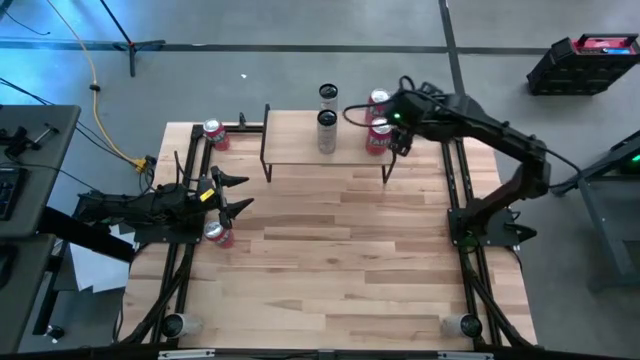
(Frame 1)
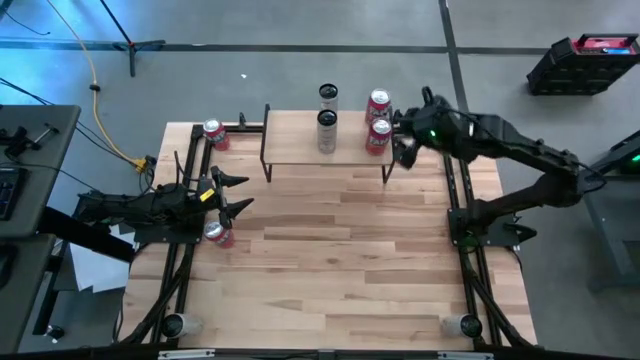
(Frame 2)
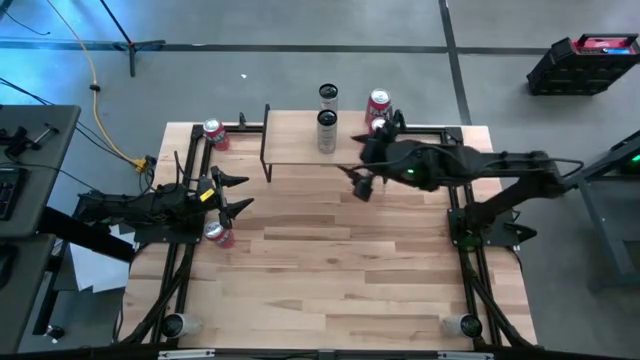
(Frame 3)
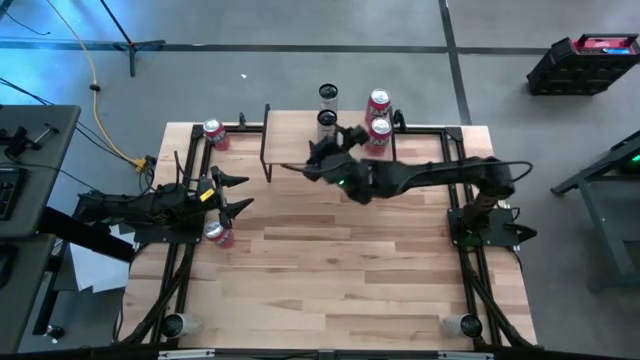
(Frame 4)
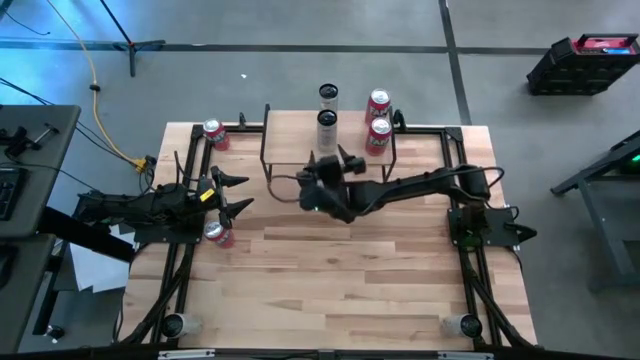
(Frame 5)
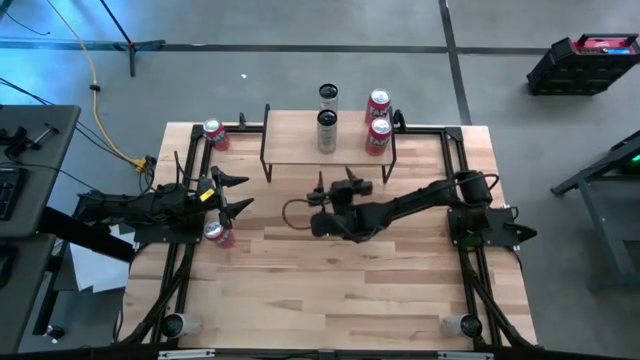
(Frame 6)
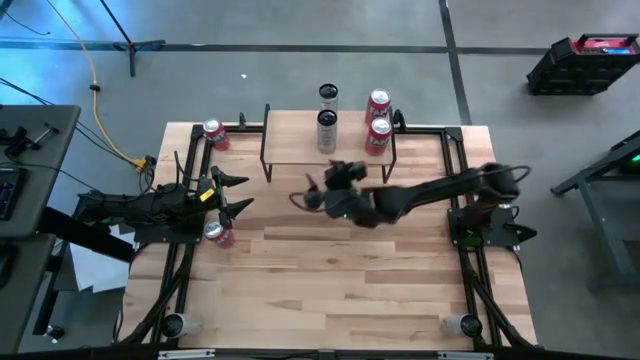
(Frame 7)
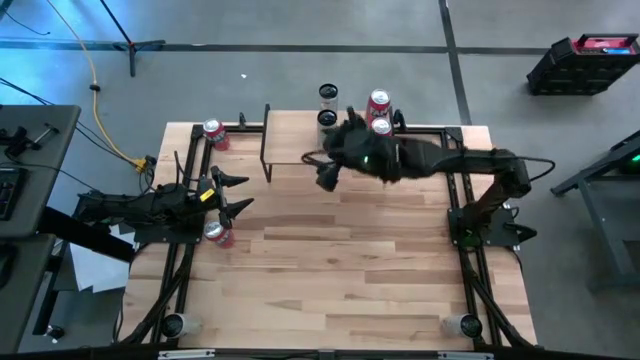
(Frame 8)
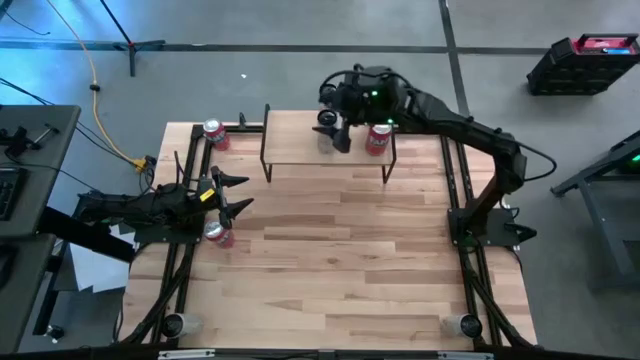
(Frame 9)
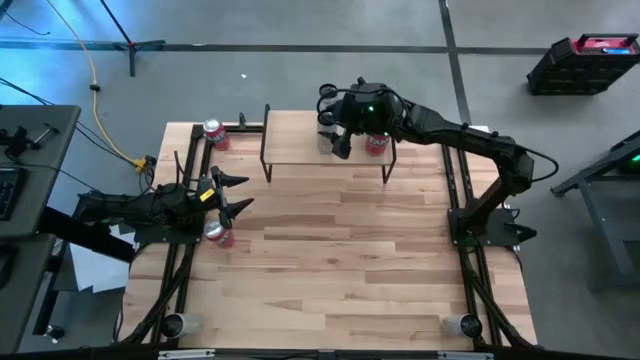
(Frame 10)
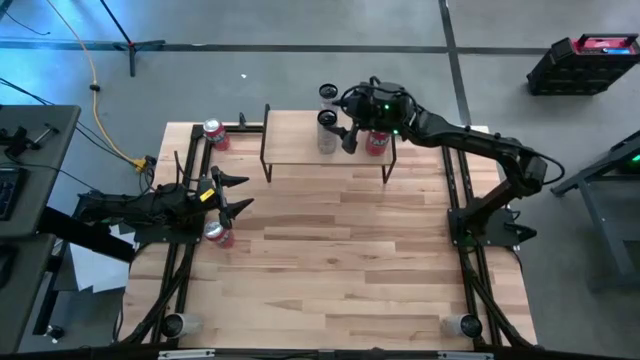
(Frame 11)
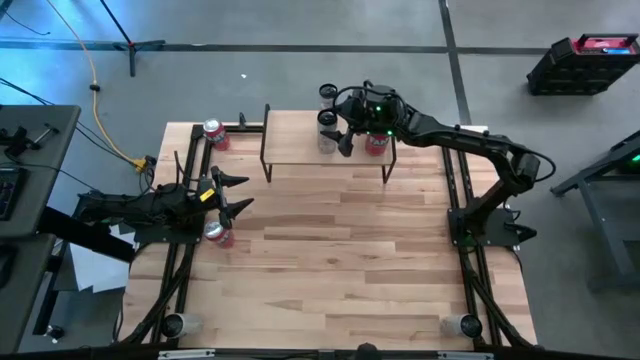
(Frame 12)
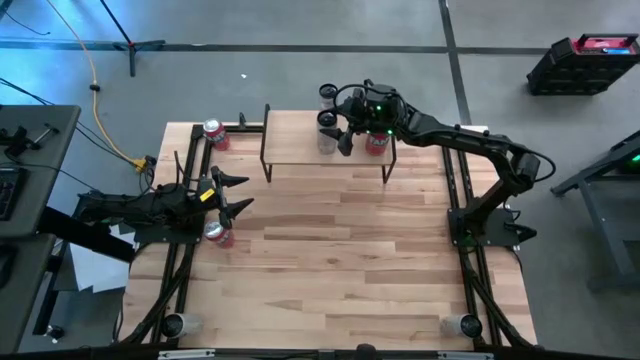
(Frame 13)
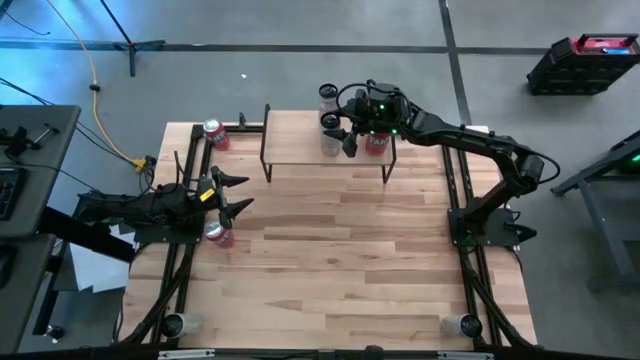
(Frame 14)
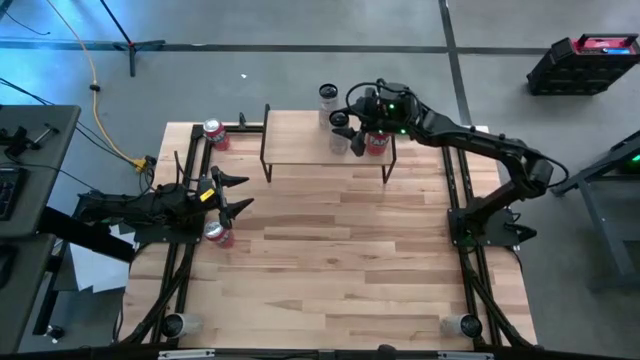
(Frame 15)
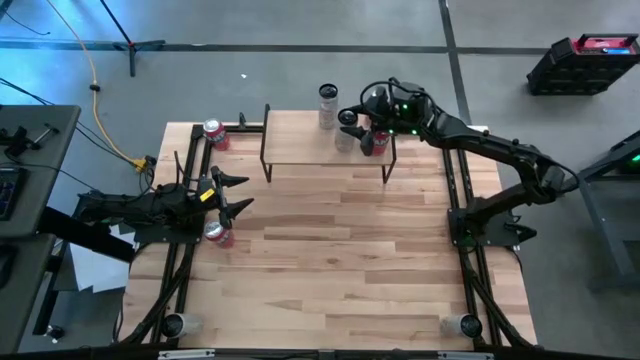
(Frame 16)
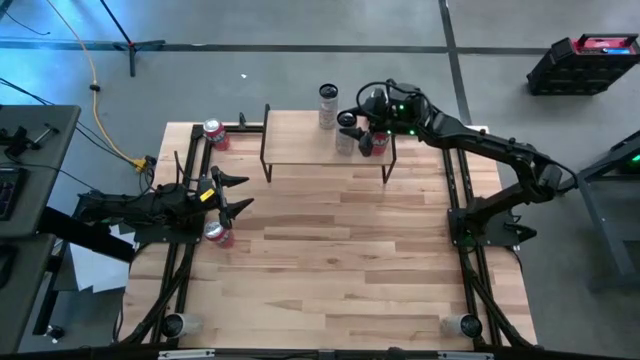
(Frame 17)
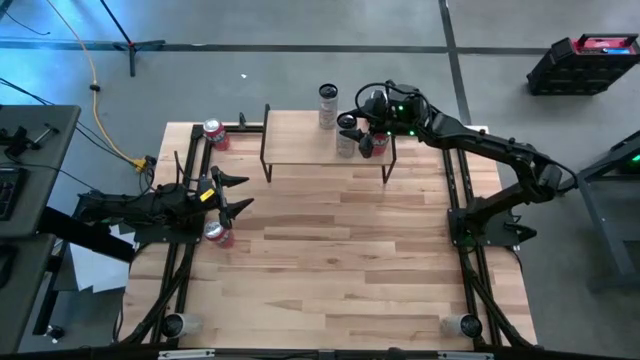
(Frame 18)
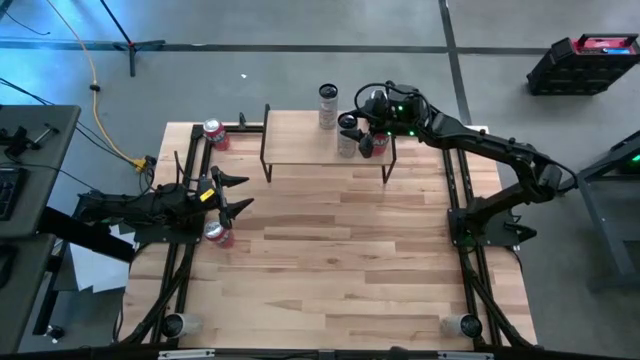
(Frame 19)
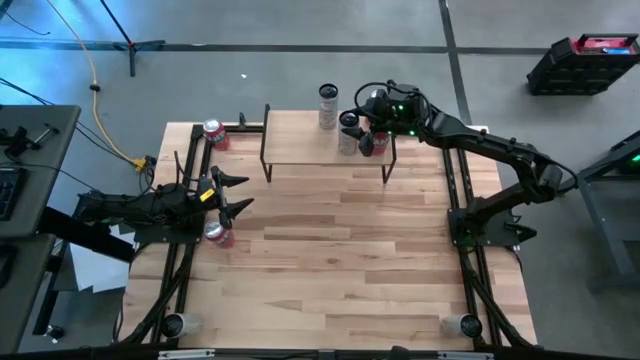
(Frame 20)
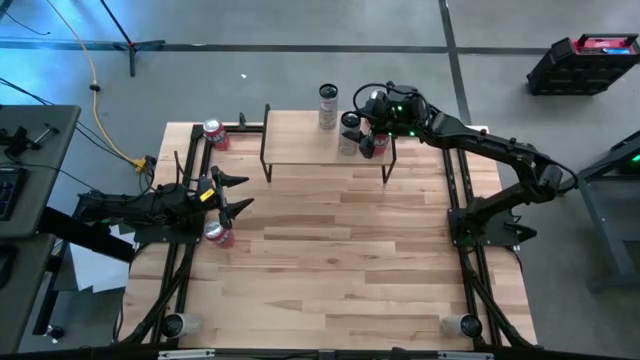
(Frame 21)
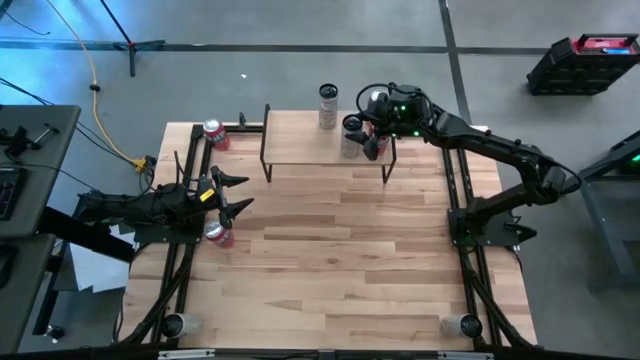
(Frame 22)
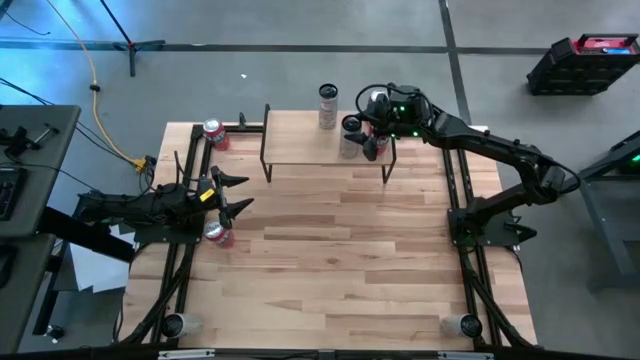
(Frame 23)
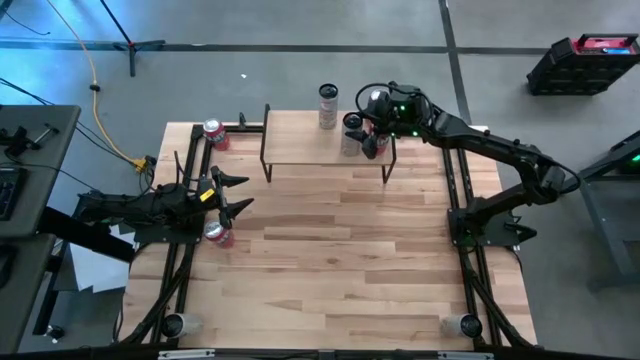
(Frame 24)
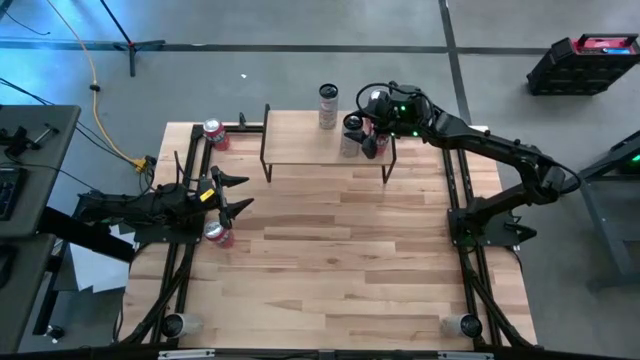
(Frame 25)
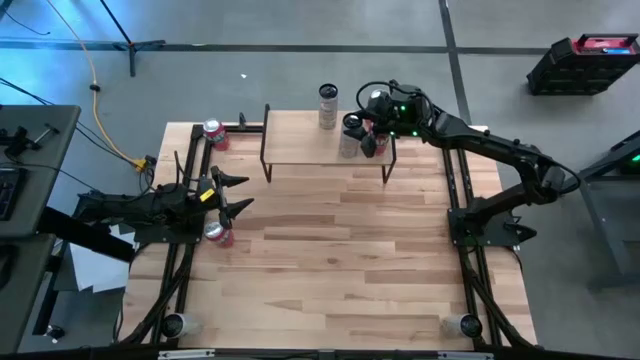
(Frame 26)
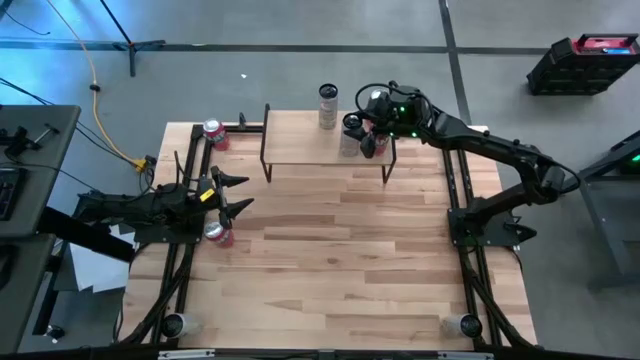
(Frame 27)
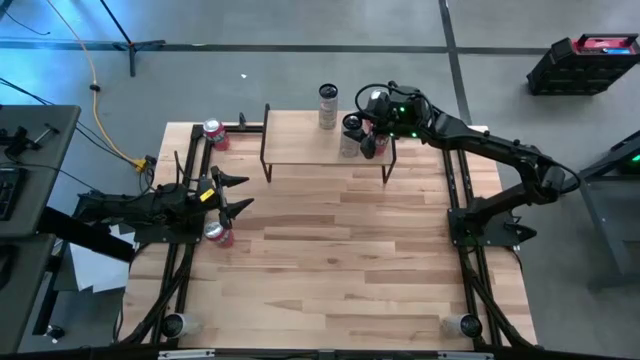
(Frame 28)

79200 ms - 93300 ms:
Task: Place canned beverage on shelf
Adjust the bottom white soda can on the shelf

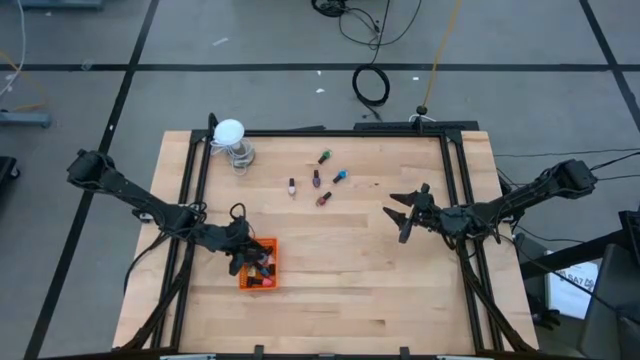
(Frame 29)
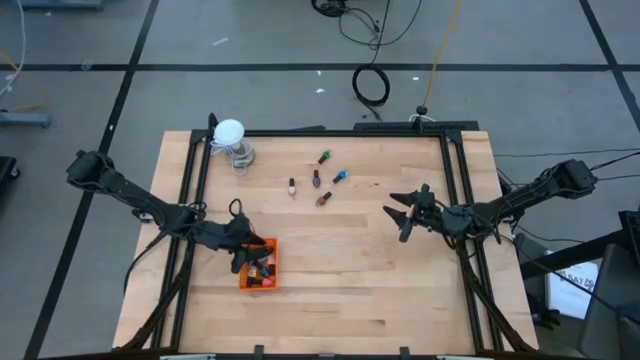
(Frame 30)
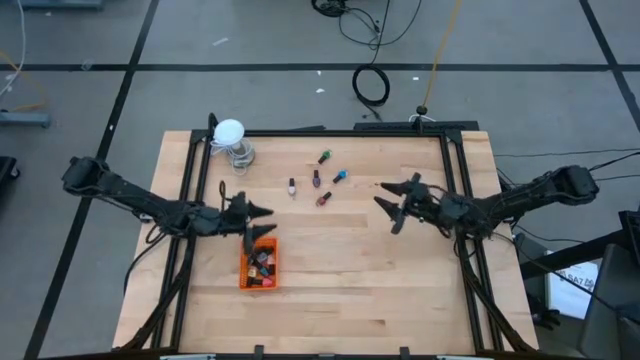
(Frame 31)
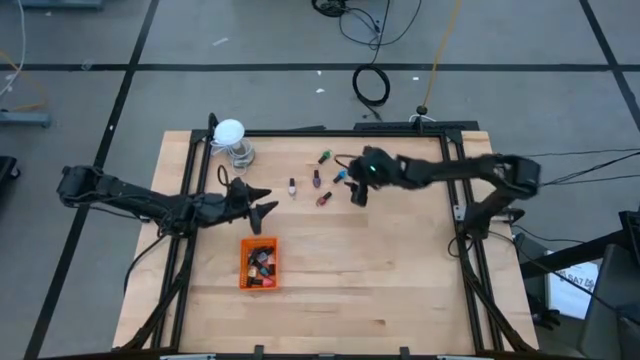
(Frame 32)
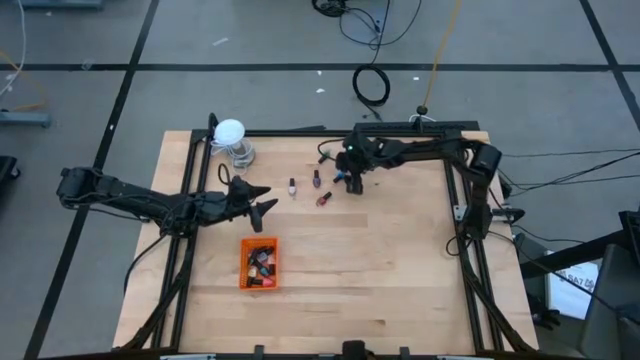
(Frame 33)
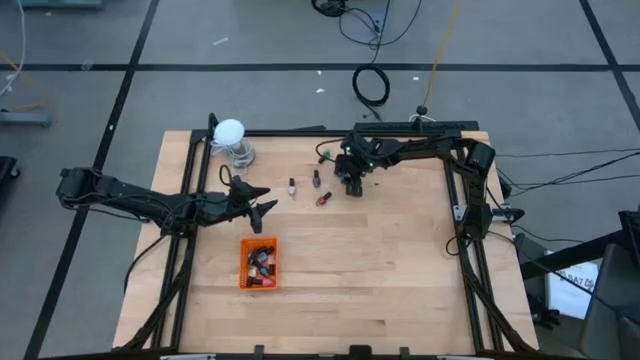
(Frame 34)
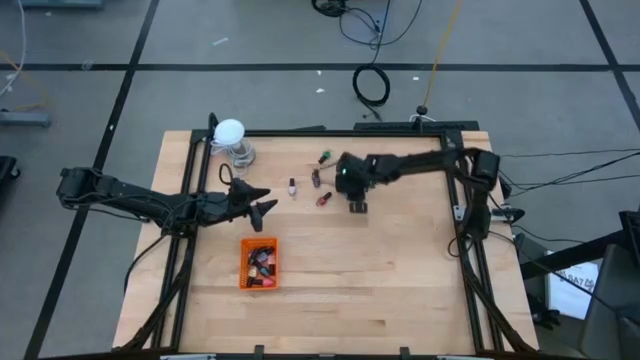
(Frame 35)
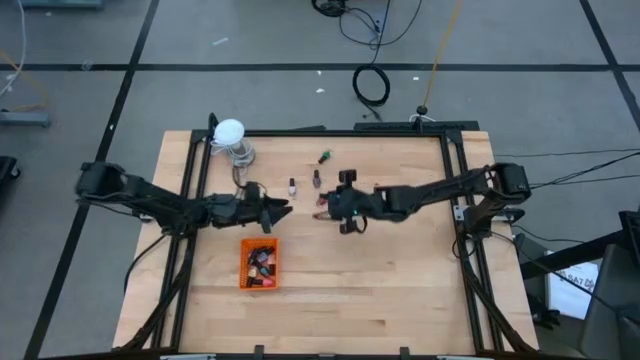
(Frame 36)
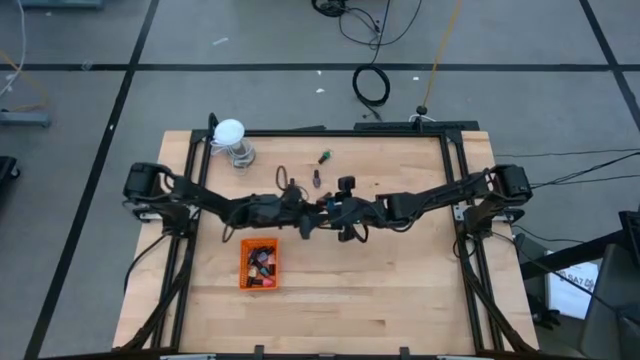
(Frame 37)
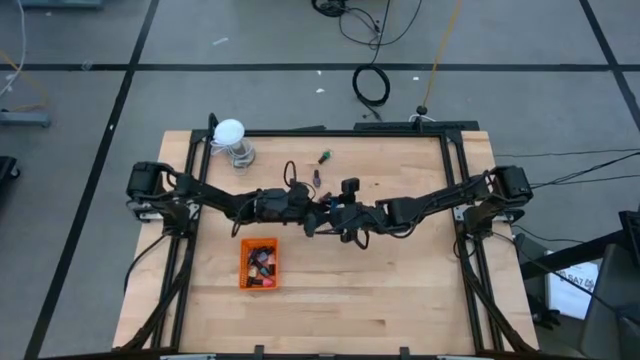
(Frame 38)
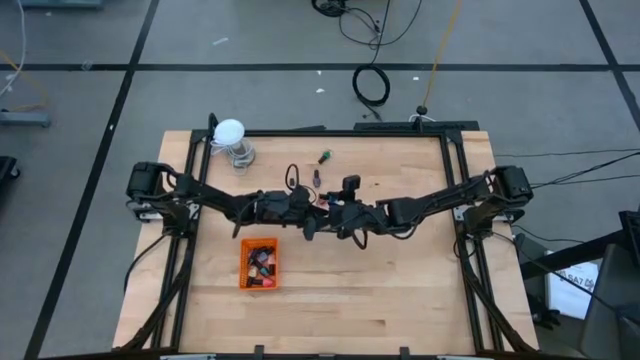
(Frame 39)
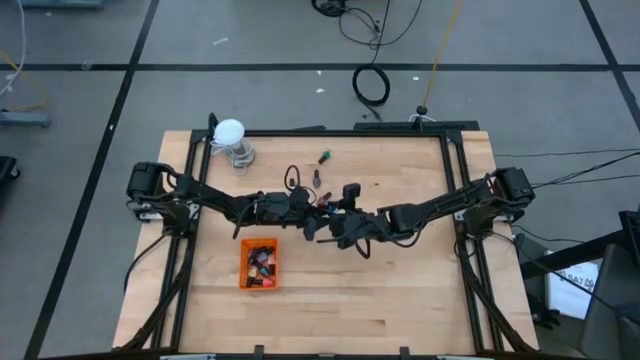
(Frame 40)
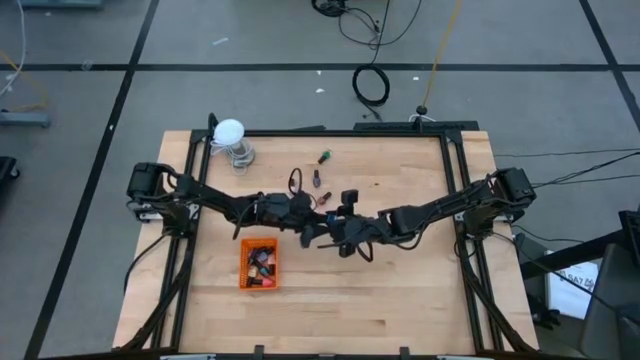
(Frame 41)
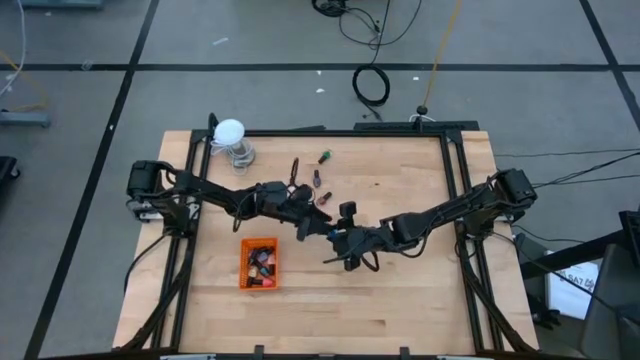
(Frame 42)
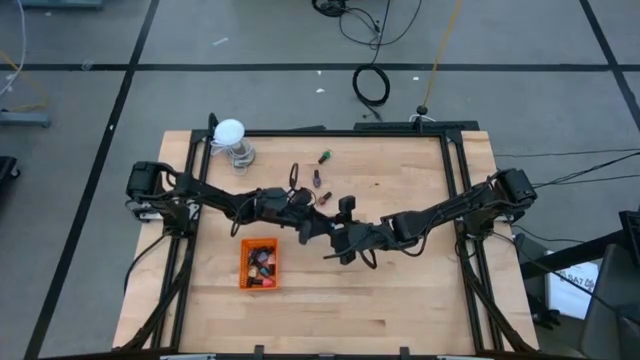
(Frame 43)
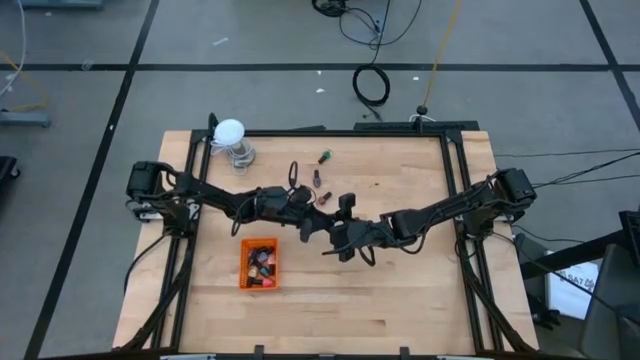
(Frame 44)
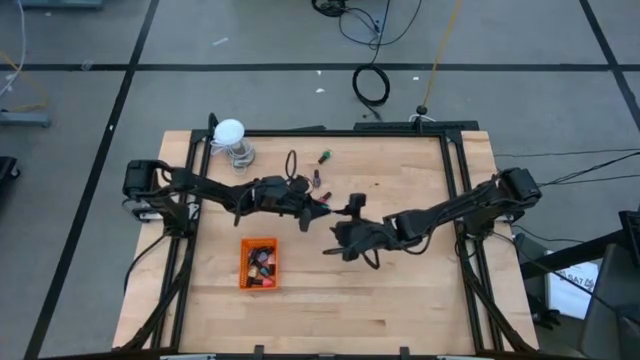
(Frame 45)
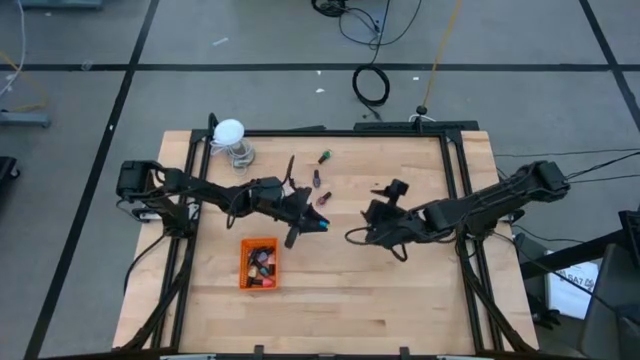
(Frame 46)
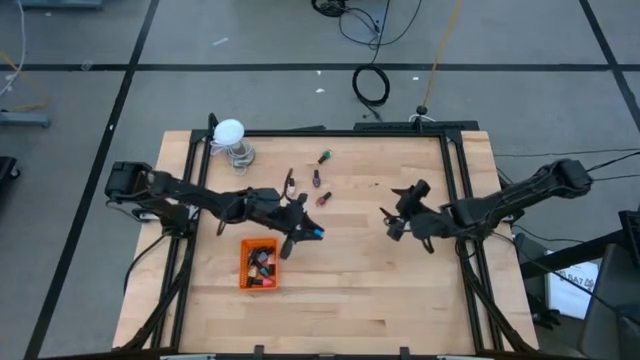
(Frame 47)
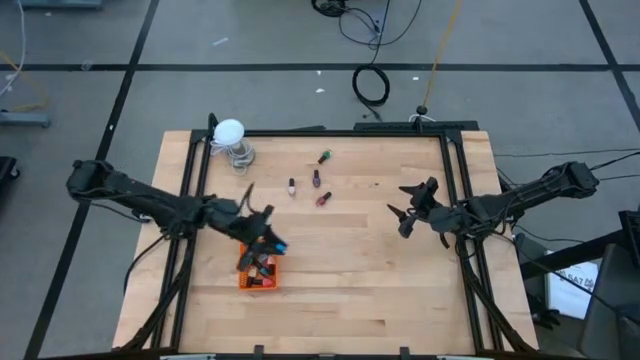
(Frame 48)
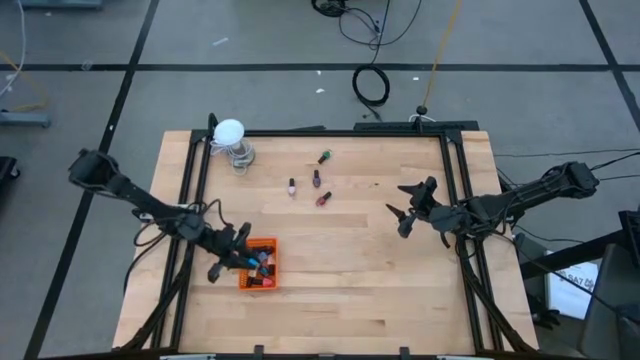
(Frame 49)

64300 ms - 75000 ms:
Task: Pick & Place Nail Polish
Put the blue nail color bottle into the orange bin
